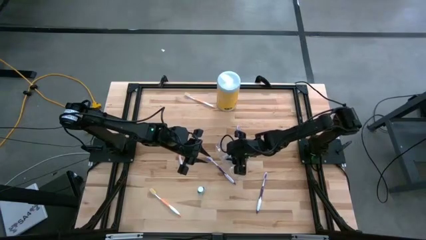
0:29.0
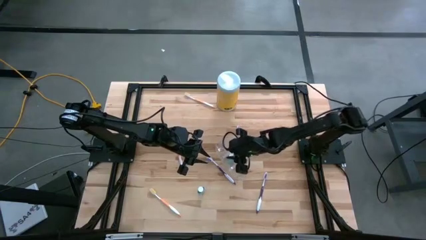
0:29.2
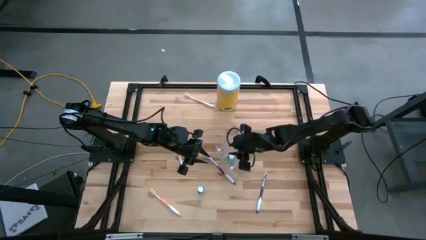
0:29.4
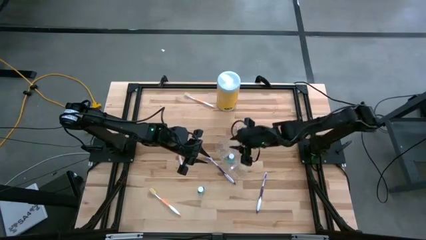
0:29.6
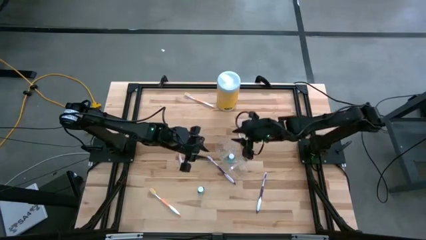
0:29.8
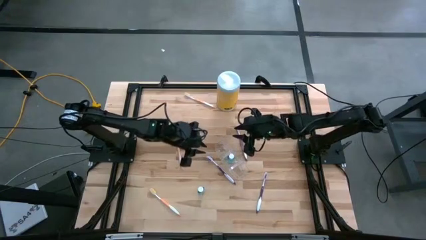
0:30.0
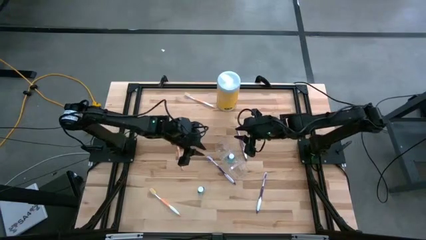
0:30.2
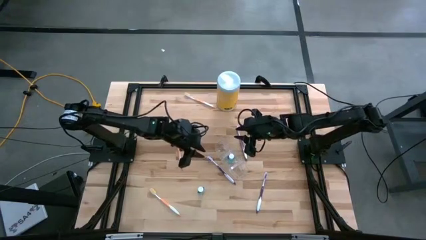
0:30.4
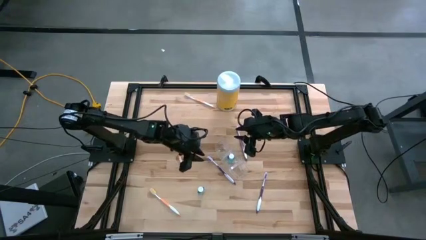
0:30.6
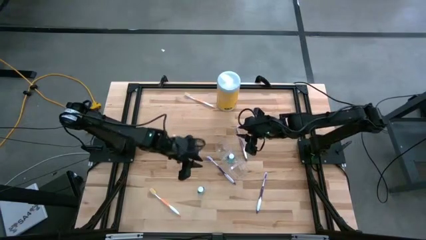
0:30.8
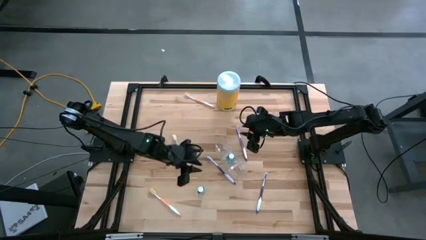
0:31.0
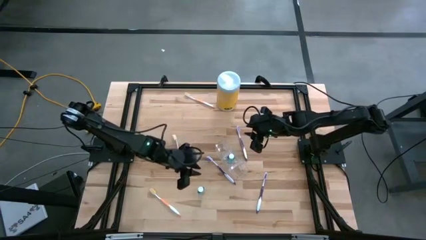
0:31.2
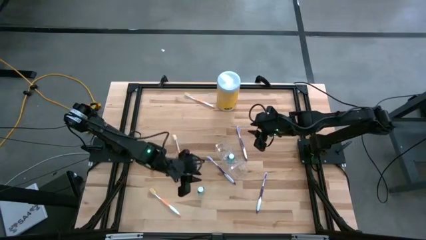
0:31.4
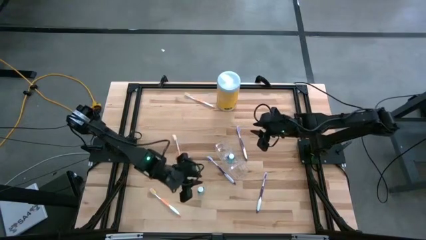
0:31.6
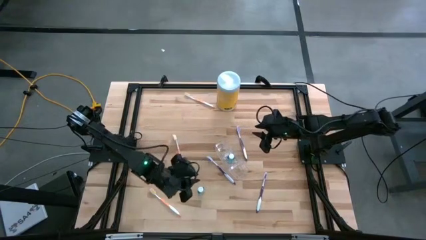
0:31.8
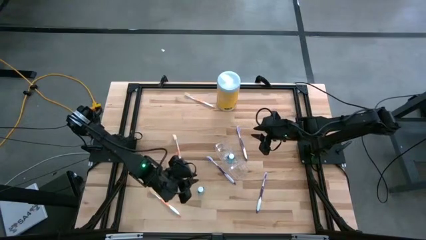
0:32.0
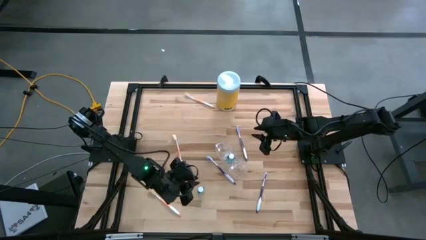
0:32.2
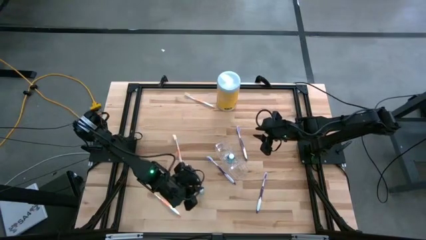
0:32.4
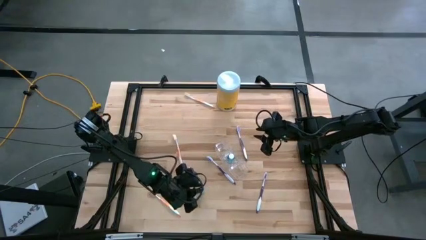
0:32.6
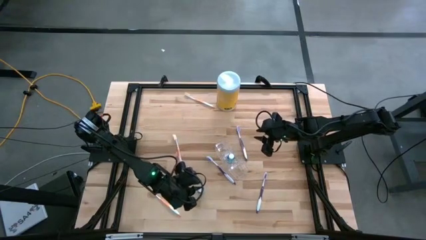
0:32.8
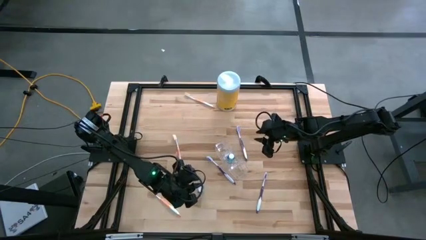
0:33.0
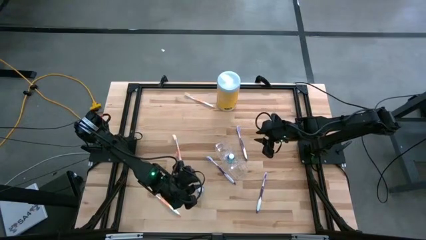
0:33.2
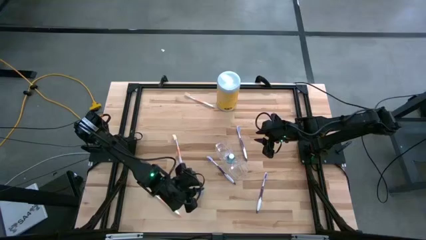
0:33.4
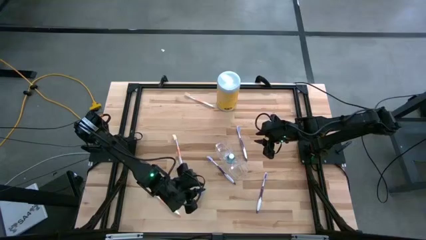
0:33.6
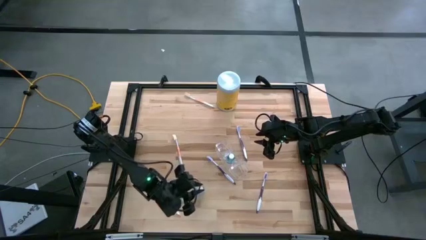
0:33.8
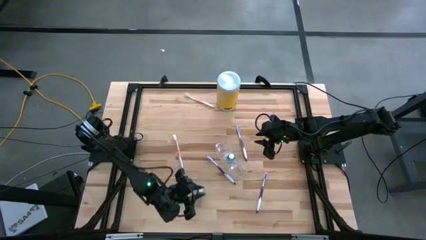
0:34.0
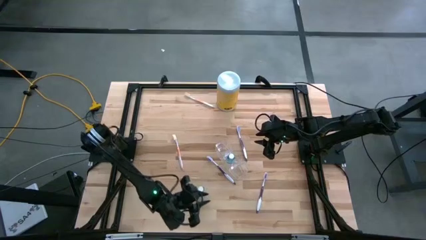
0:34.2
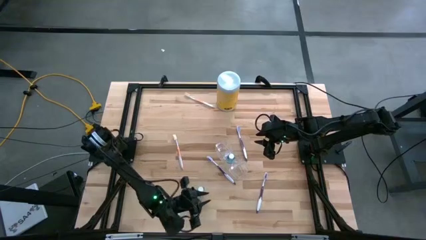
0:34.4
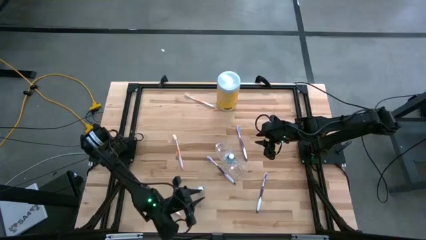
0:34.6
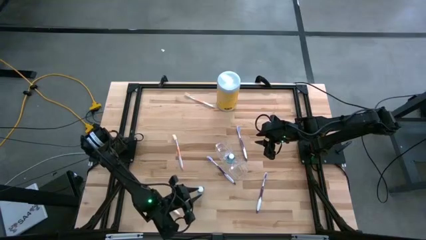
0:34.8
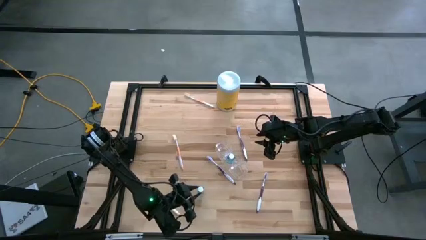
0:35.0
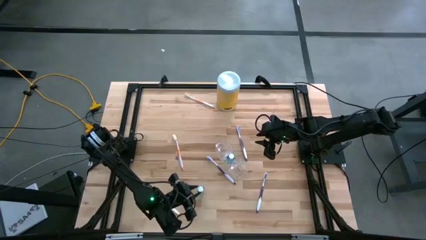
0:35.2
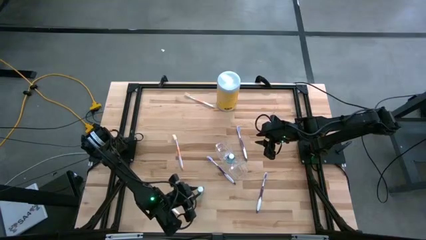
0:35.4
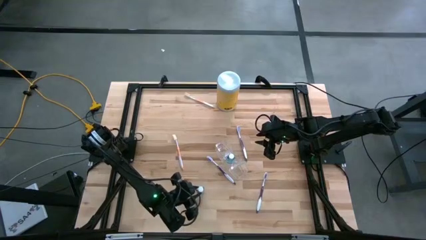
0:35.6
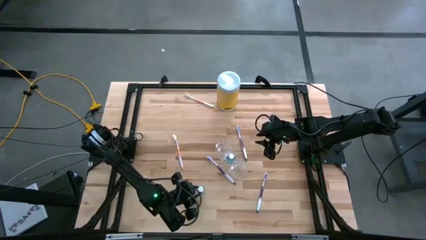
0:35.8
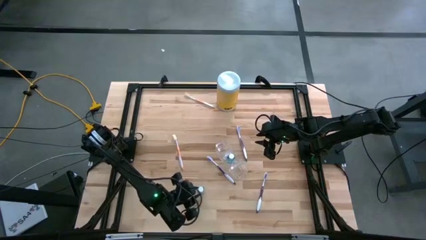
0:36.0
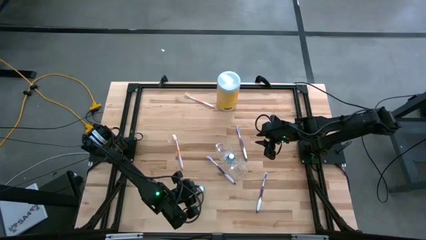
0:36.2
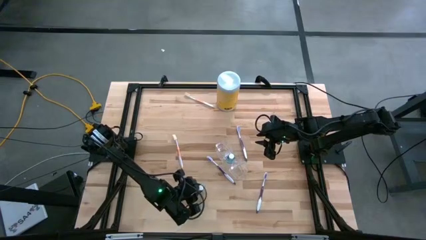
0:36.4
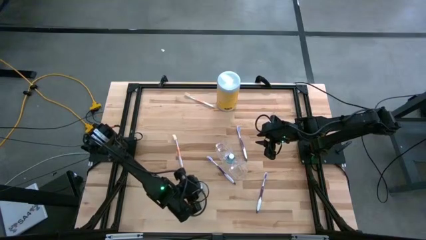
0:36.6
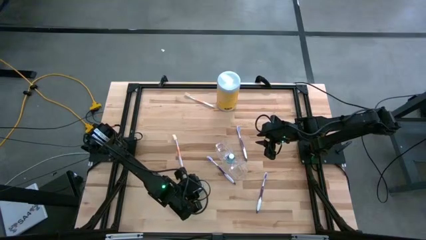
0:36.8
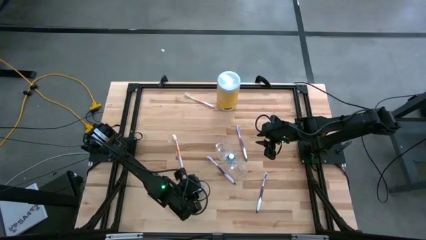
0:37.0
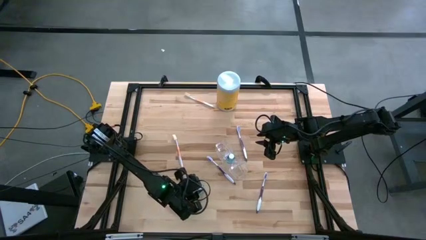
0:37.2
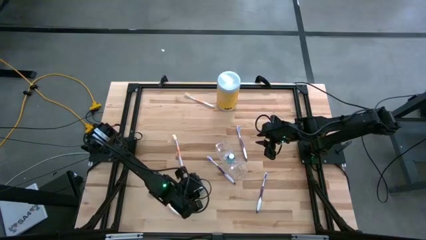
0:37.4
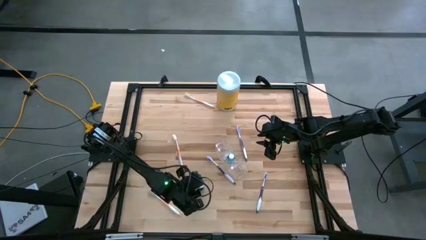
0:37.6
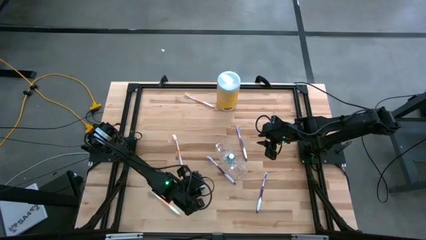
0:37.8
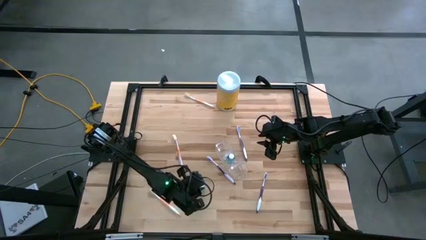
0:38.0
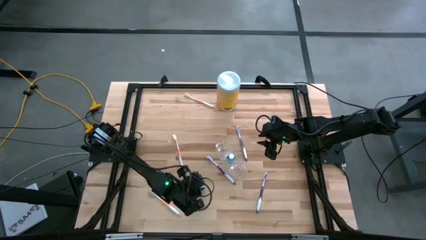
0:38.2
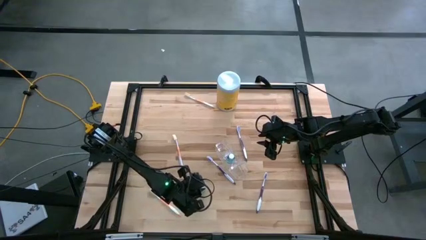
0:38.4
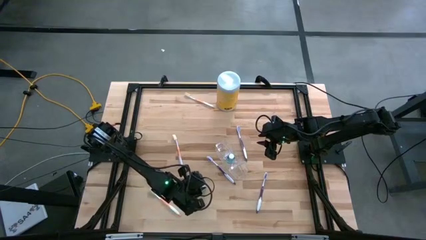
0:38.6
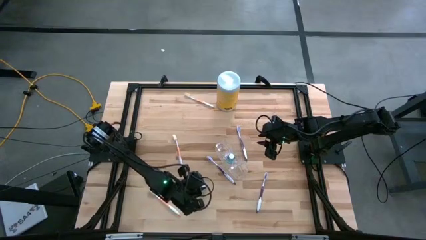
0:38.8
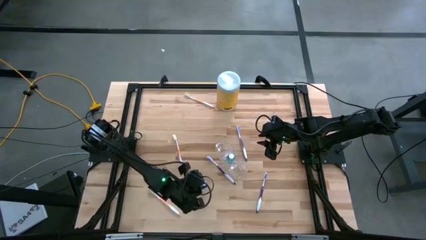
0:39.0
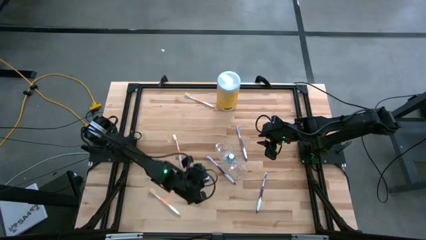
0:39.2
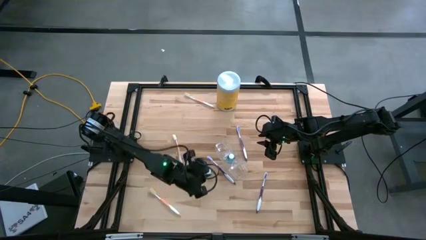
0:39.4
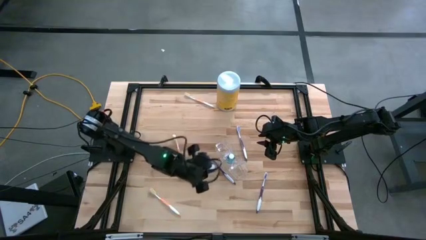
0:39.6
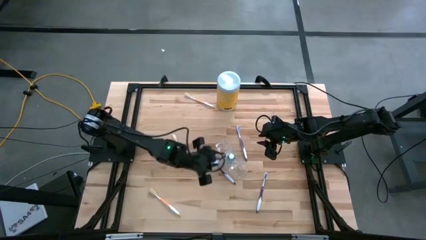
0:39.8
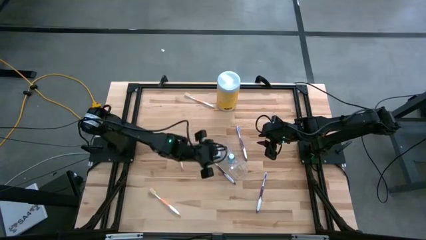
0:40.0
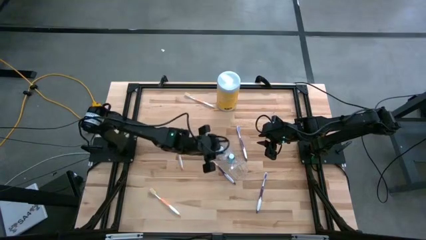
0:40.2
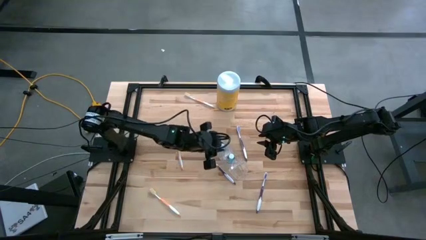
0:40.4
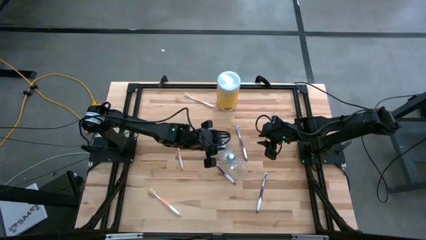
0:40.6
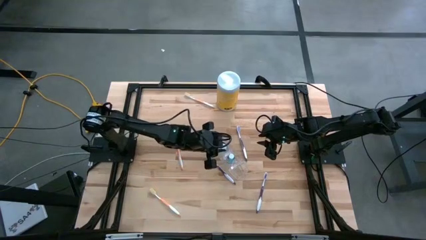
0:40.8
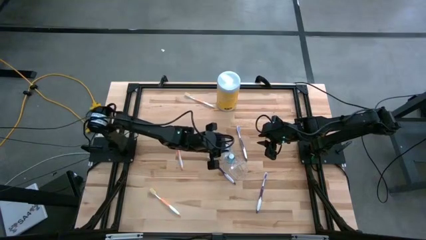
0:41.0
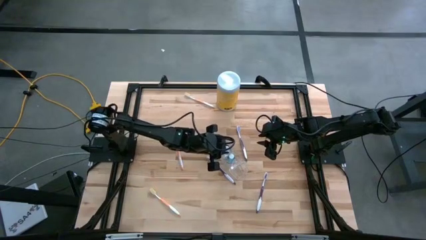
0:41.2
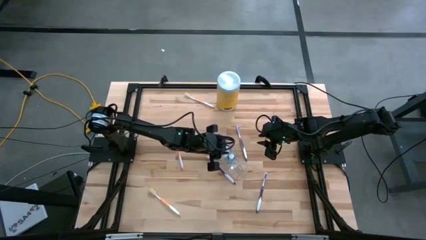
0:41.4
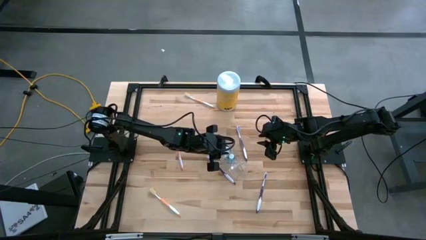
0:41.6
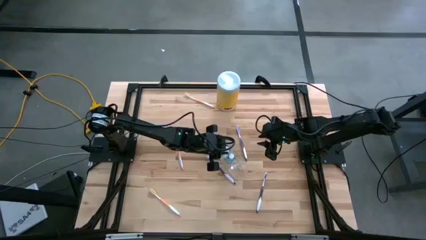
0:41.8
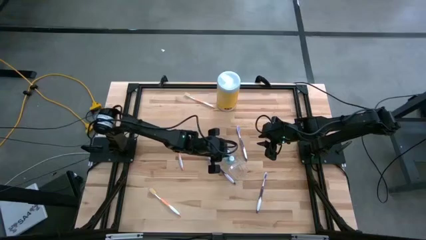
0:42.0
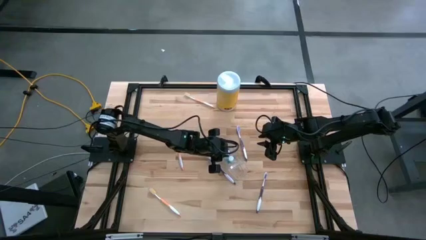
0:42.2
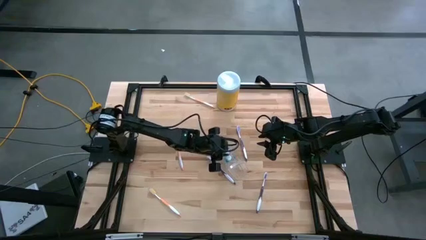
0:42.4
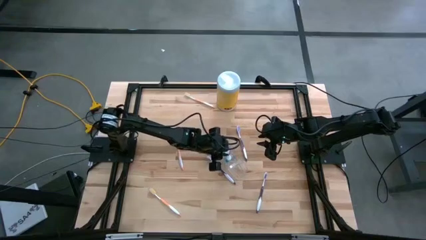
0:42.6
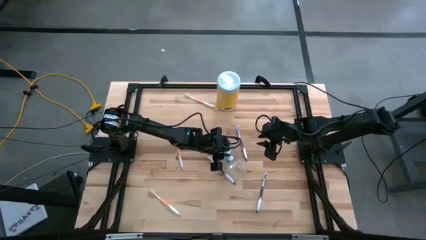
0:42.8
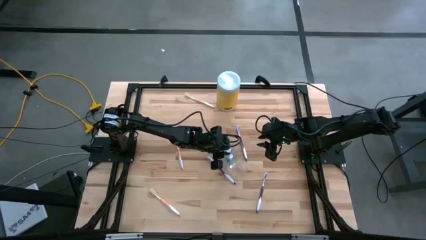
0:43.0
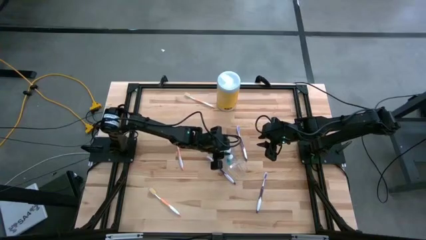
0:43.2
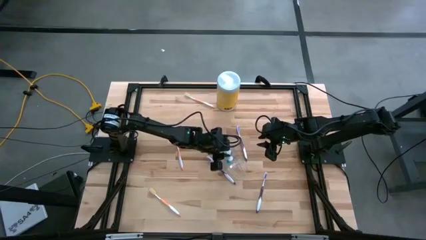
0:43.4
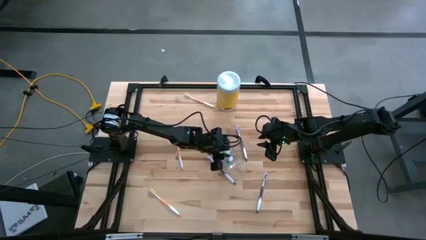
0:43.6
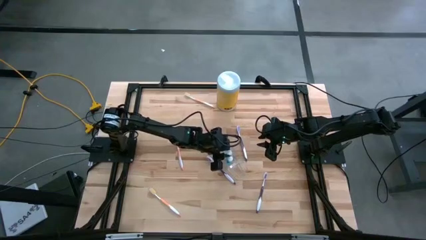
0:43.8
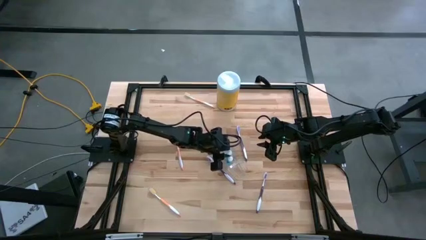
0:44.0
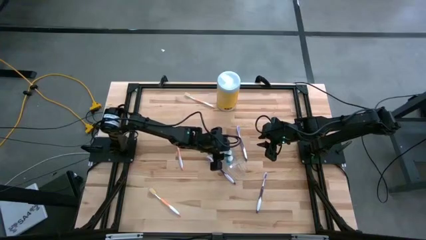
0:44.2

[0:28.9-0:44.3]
Task: Pick & Place toothbrushing station
Put the mouthwash into the transparent organizer

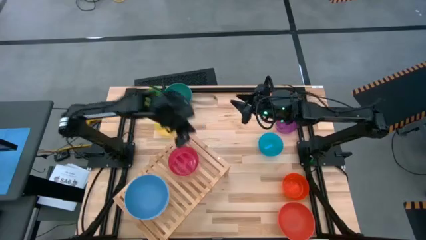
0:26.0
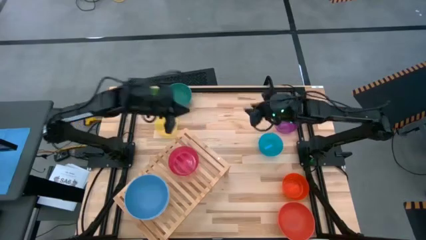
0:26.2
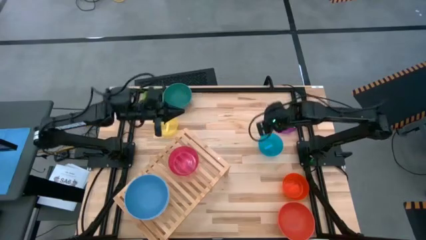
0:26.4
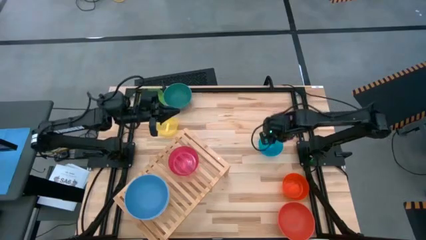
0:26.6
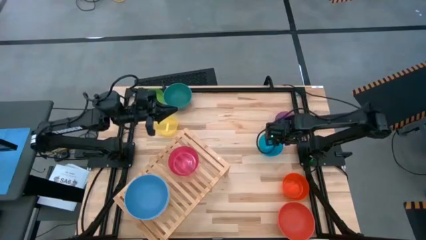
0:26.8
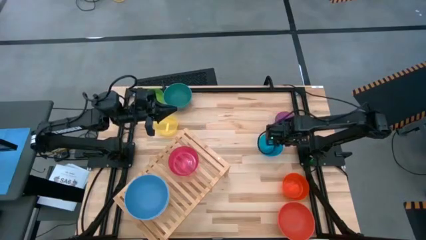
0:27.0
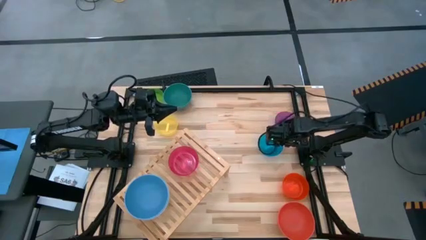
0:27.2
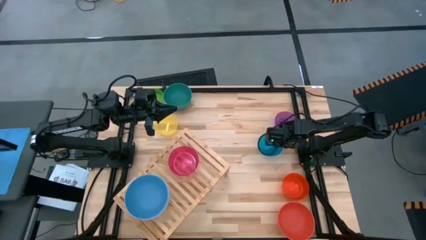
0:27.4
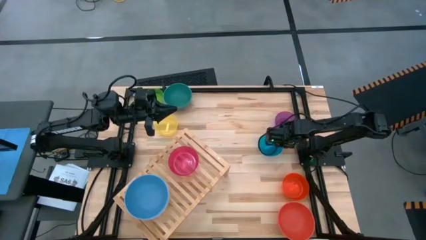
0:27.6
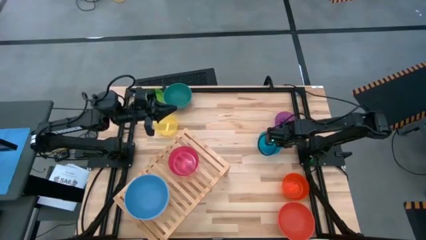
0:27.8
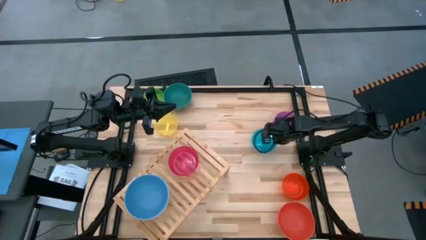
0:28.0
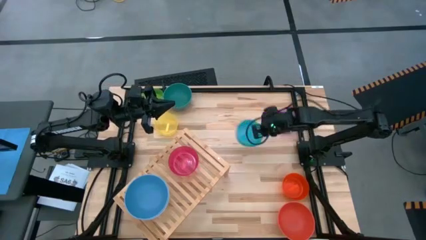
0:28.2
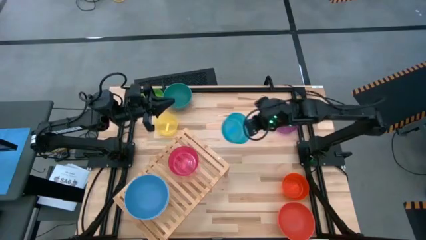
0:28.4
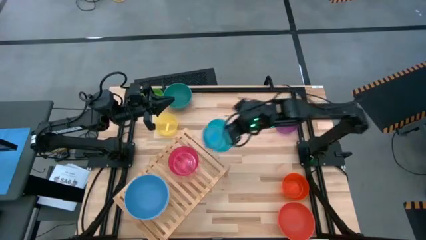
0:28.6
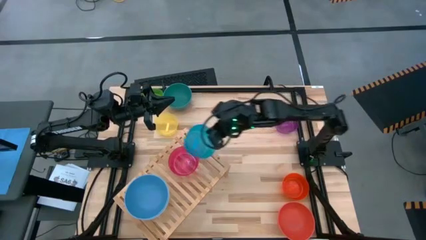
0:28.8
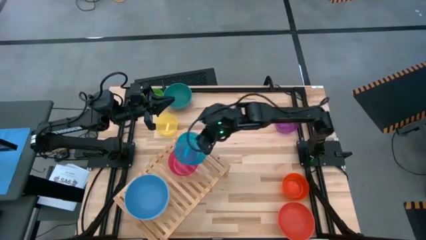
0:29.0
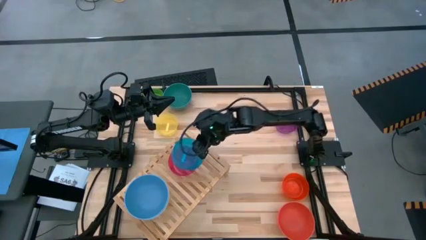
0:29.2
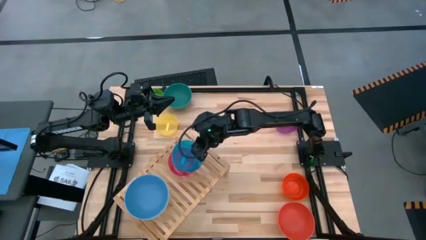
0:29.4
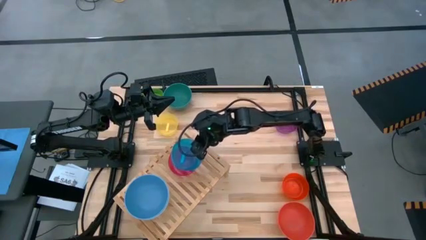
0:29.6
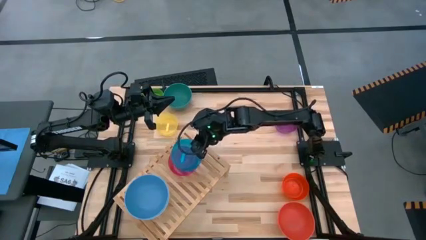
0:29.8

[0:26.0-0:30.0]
Task: Place and stack bowls onto a shelf
Stack the small blue bowl on the shelf on top of the small red bowl on the shelf
